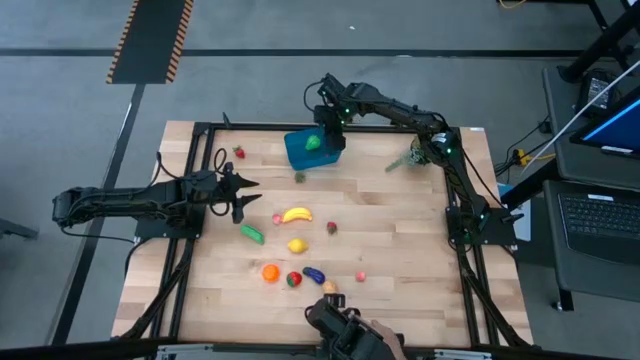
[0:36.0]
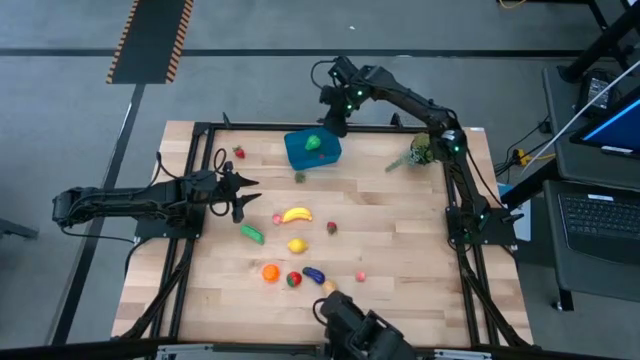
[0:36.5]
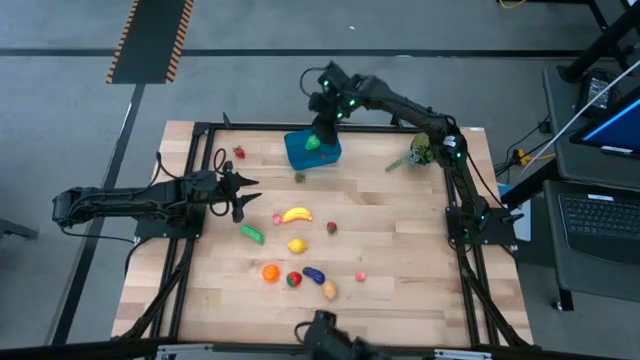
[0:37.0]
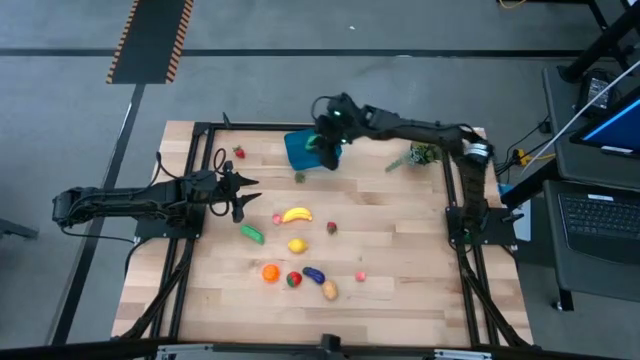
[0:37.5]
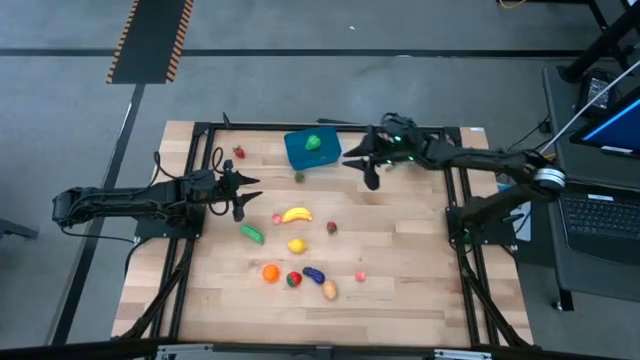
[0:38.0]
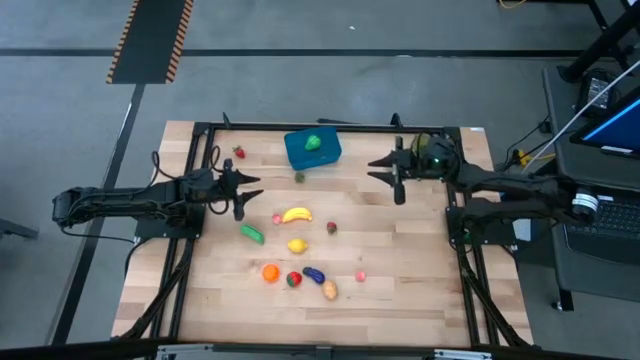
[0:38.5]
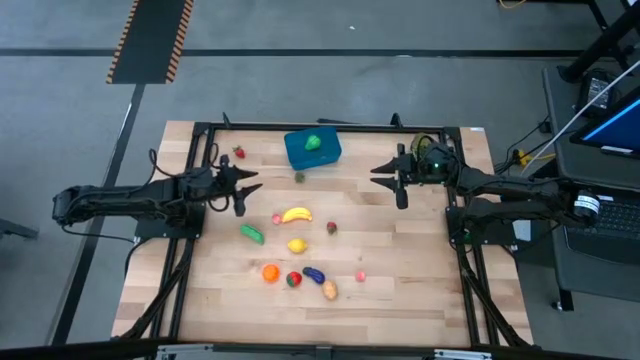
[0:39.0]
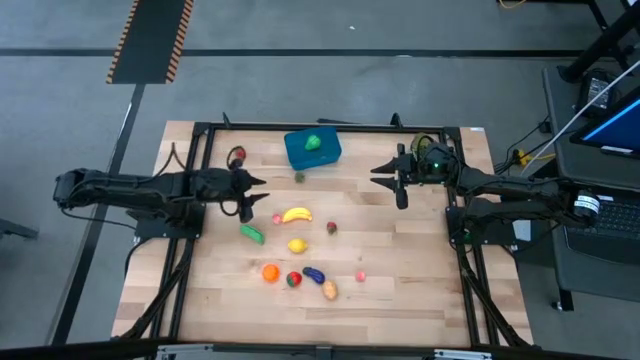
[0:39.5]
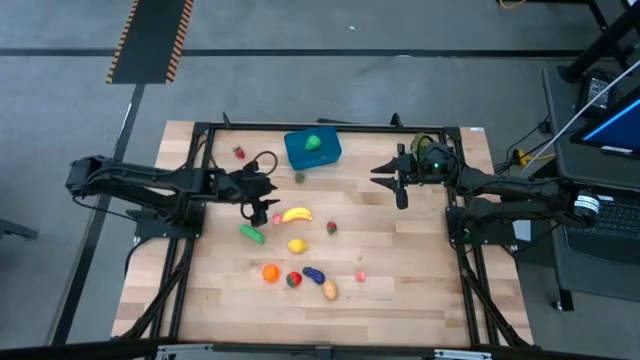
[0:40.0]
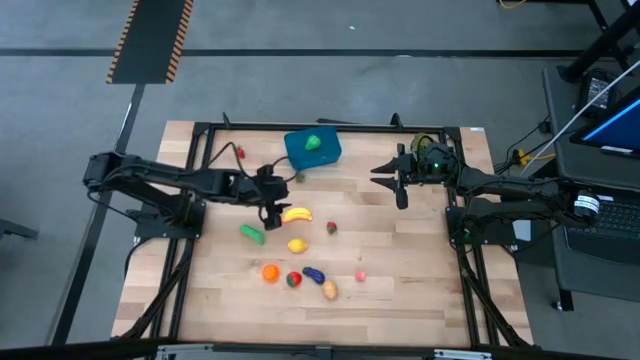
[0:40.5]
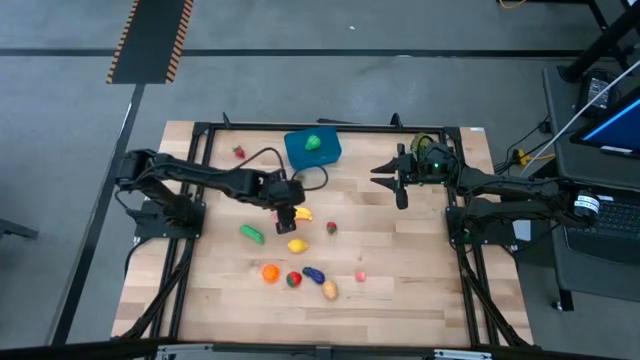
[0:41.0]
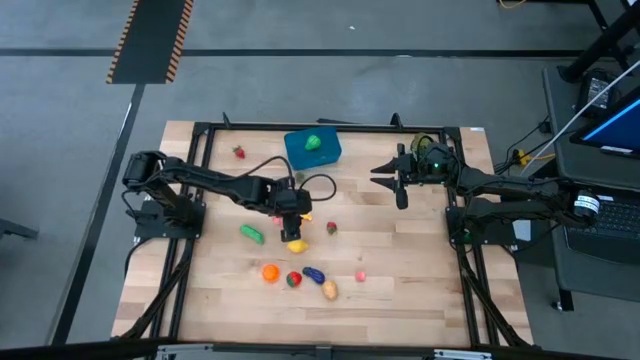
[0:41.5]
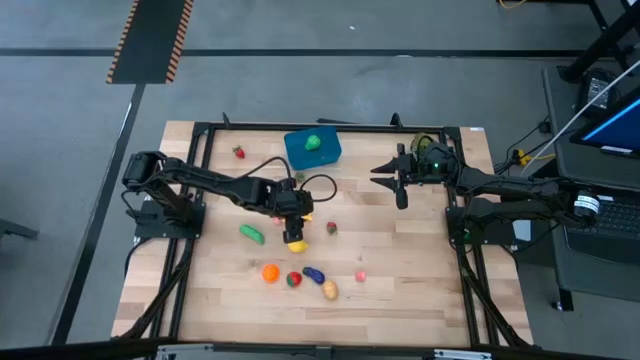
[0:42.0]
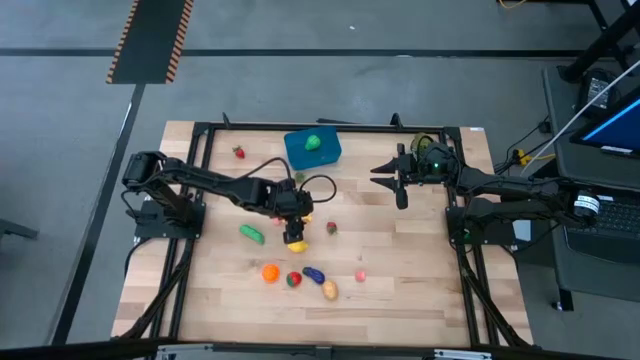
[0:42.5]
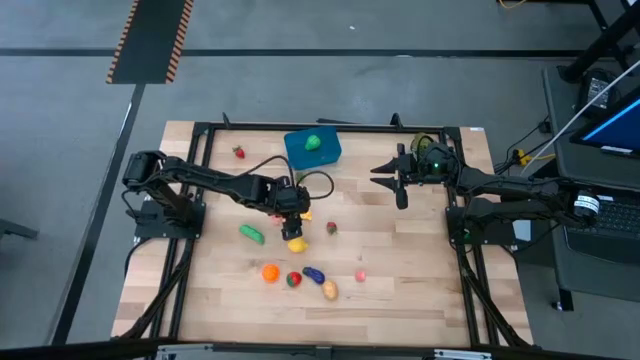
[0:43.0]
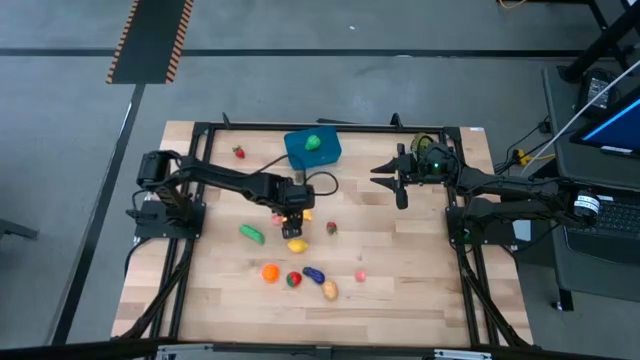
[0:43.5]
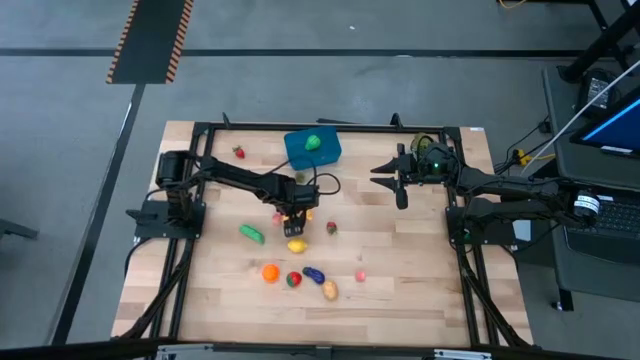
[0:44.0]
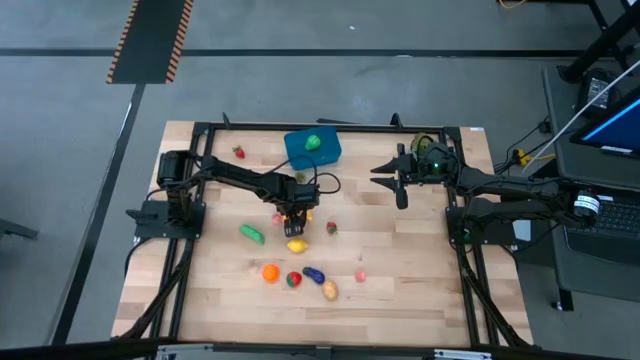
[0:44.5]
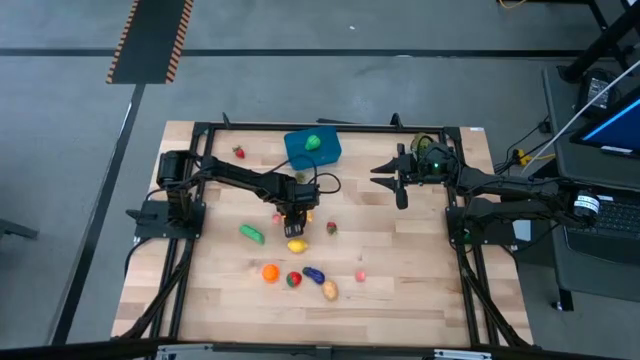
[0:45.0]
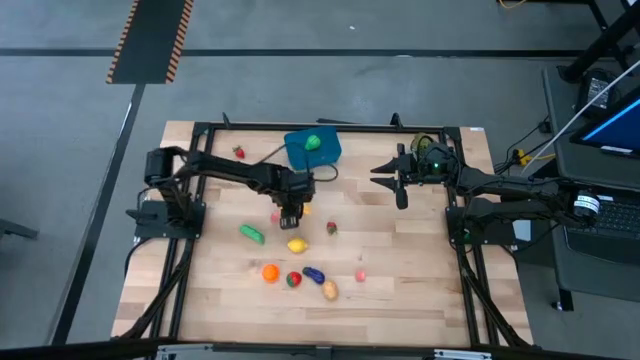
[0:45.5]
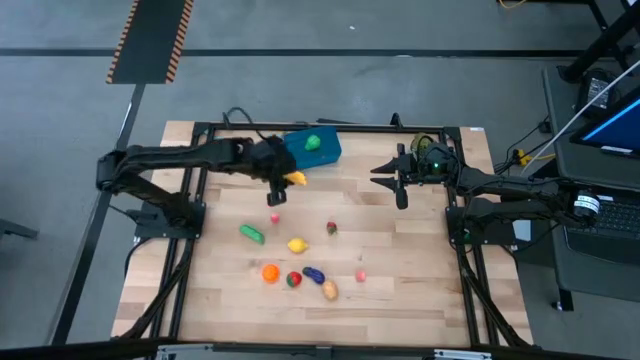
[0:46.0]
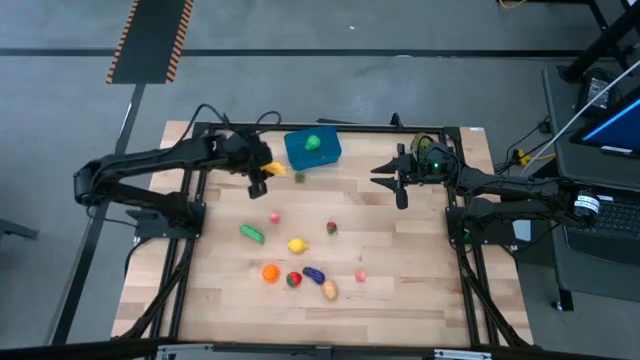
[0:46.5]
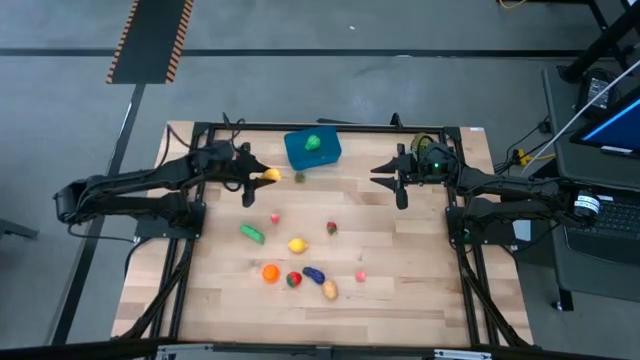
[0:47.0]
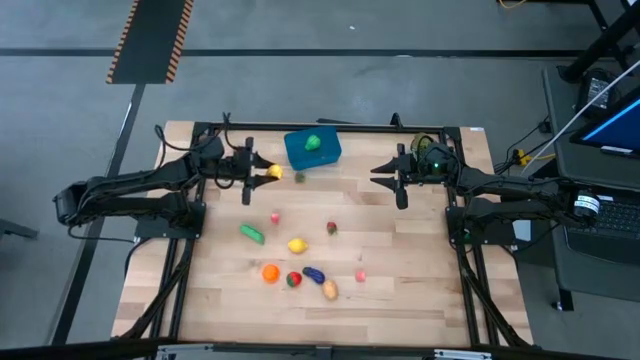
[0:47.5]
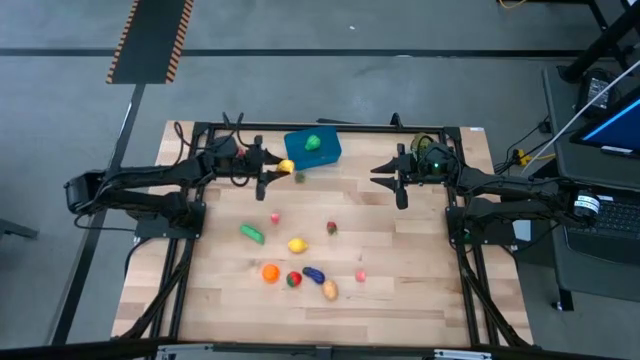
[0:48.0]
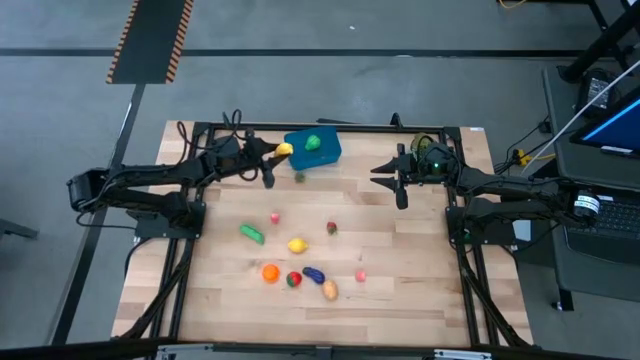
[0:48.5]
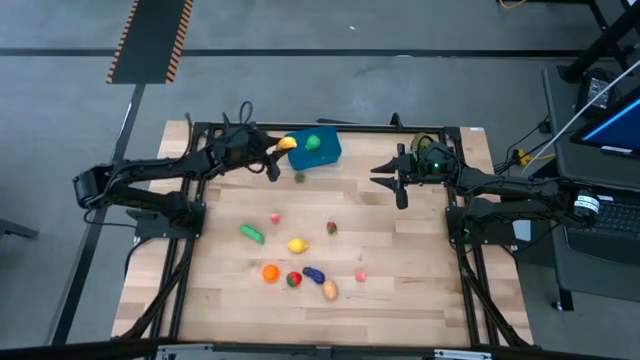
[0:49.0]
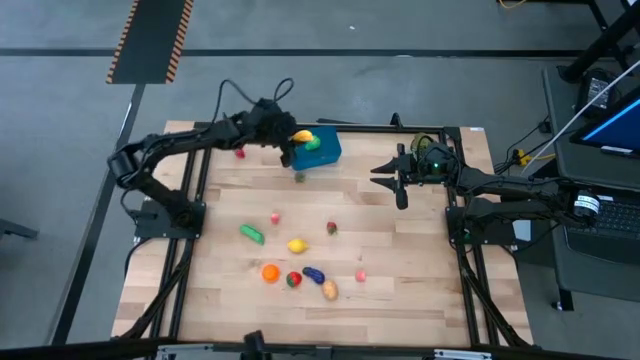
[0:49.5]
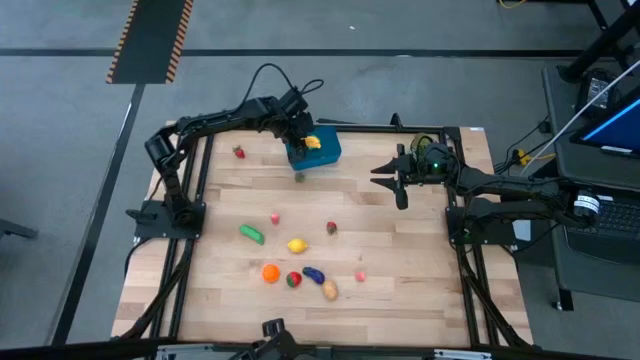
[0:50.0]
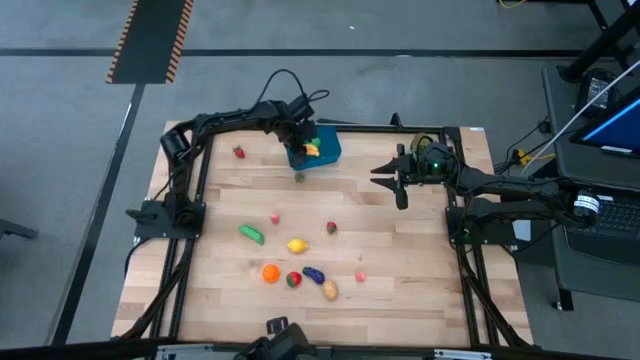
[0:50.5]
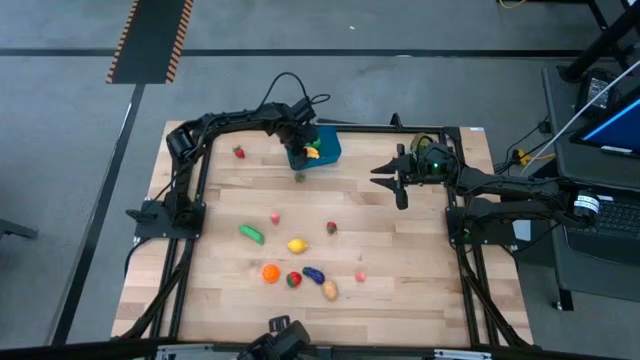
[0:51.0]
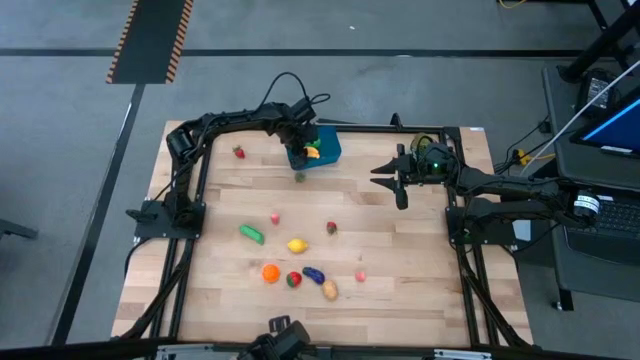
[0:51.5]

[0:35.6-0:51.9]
Task: Pick and placing Produce into tupperware
Put the banana into the blue bin

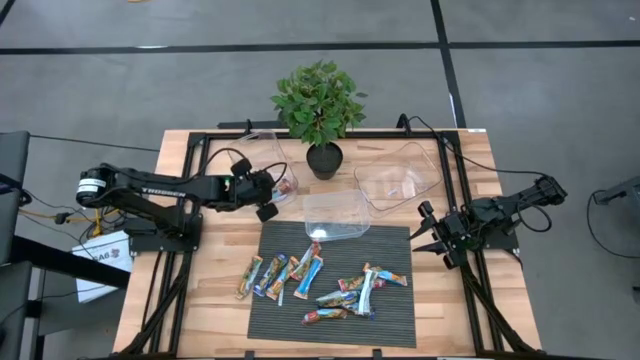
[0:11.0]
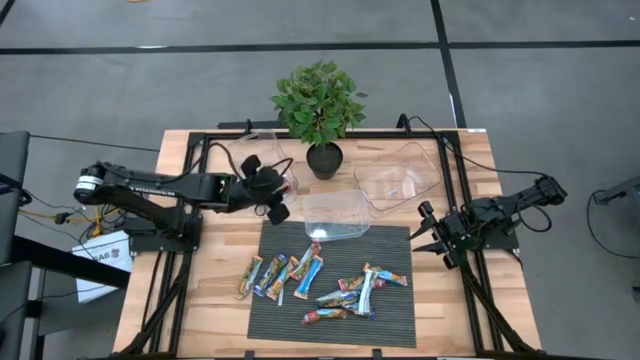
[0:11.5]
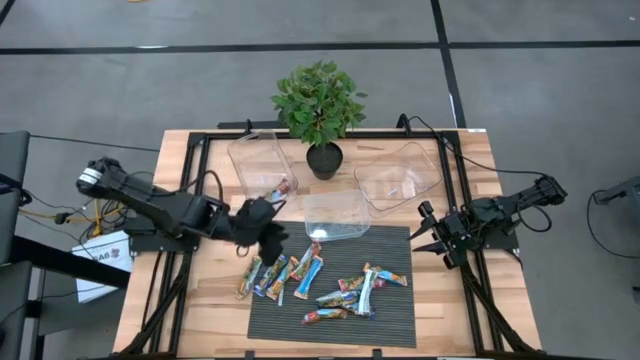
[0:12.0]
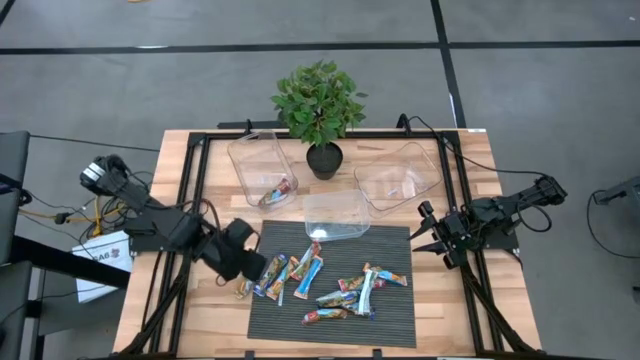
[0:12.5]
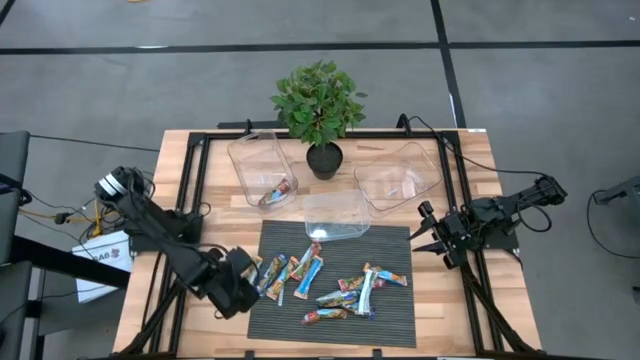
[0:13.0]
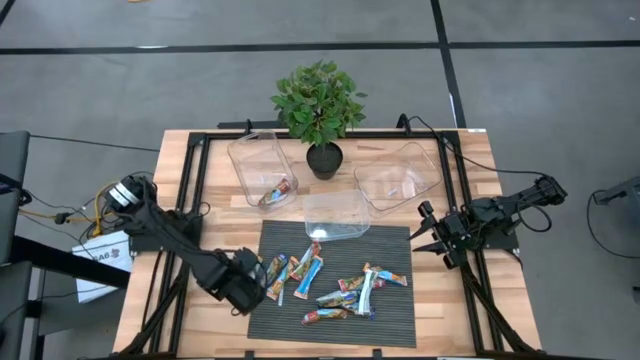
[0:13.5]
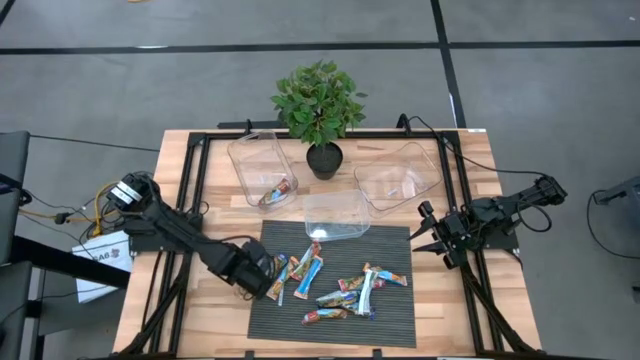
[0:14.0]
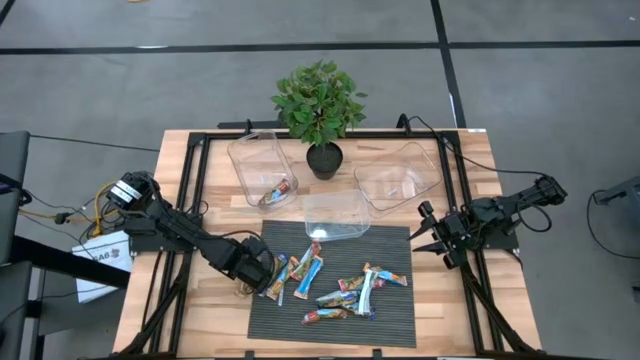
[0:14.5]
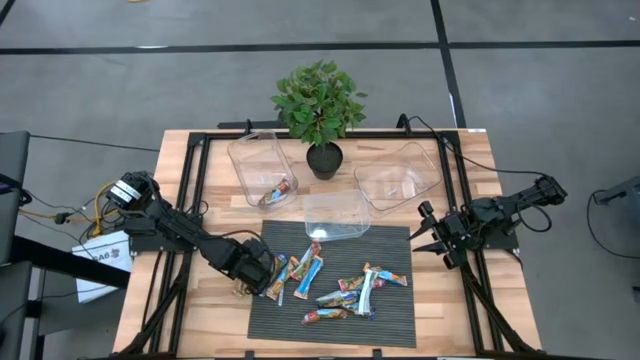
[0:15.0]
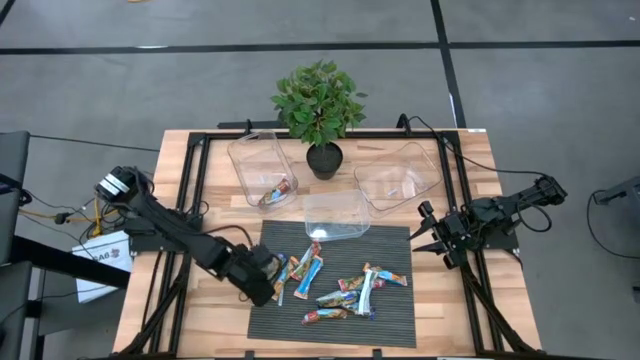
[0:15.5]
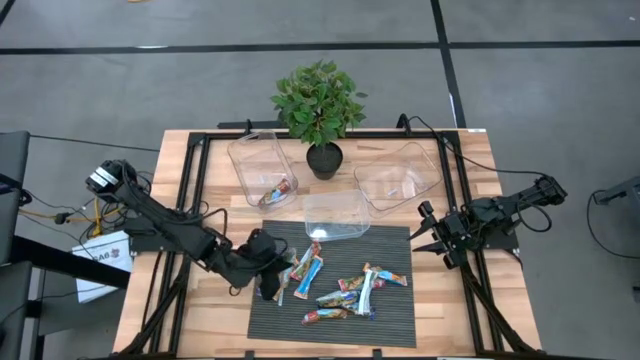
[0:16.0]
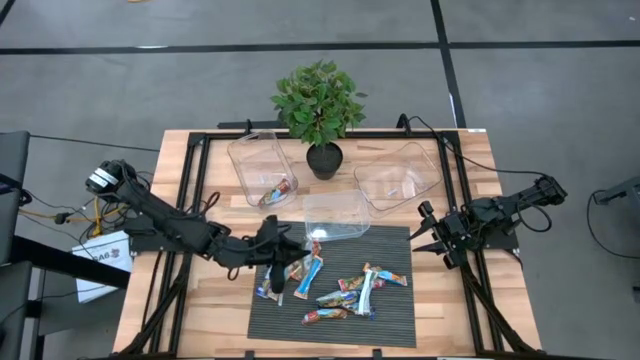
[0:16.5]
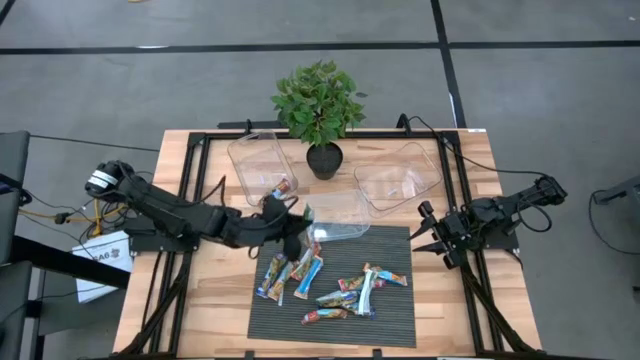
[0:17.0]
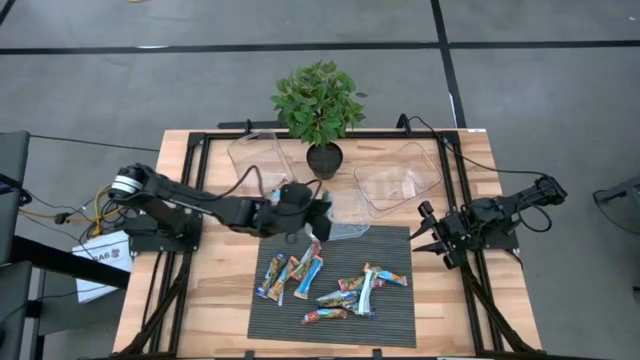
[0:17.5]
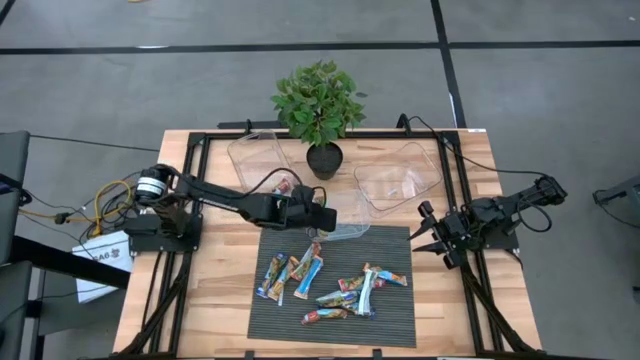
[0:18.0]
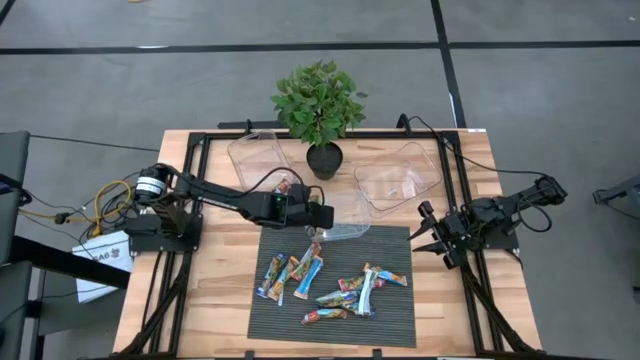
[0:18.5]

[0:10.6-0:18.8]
Task: Pick and place Granola Bars by type
Put the orange granola bar into the middle transparent bin
